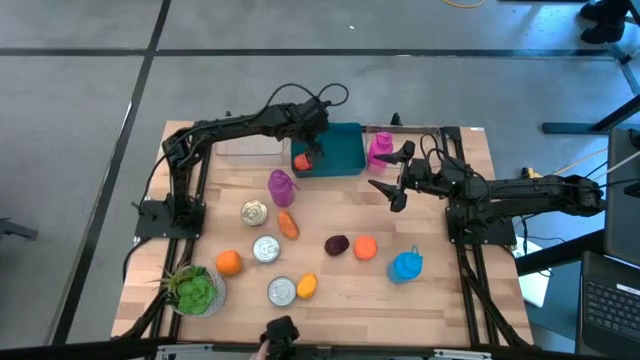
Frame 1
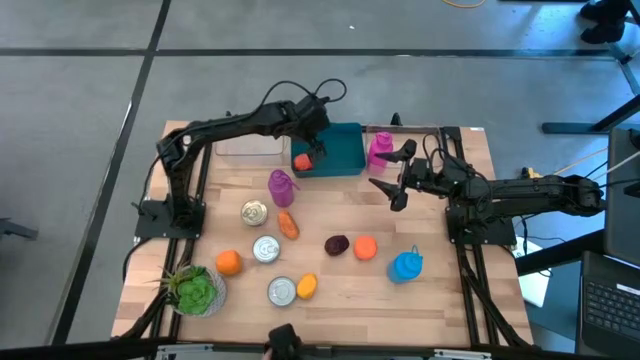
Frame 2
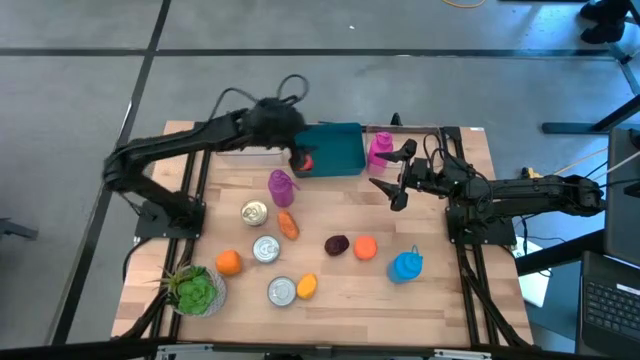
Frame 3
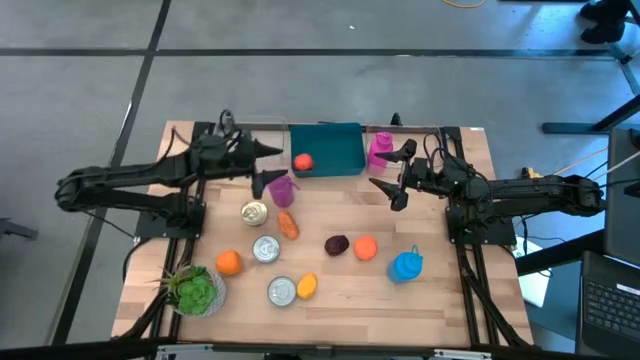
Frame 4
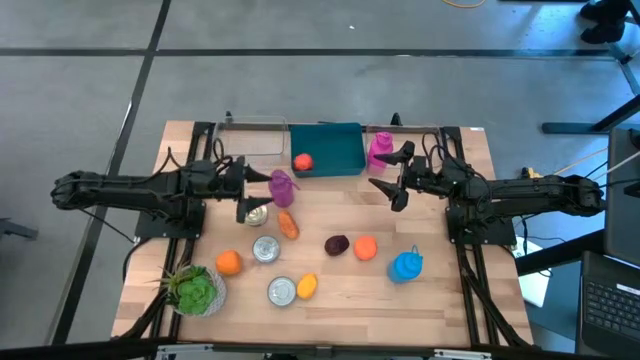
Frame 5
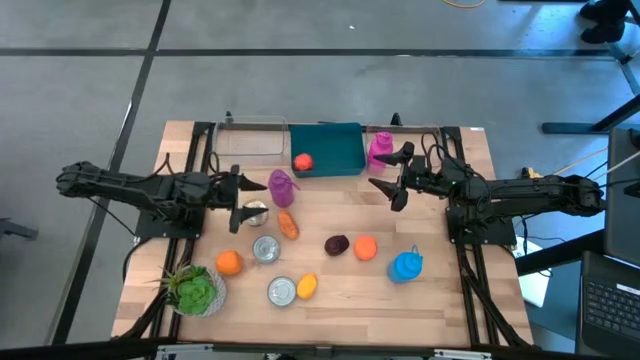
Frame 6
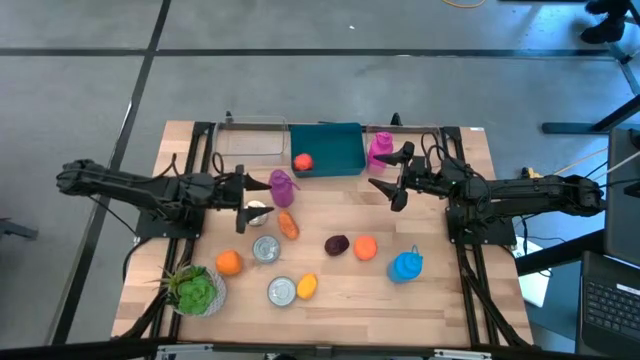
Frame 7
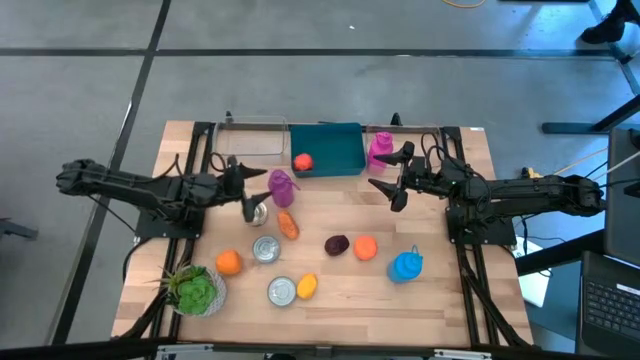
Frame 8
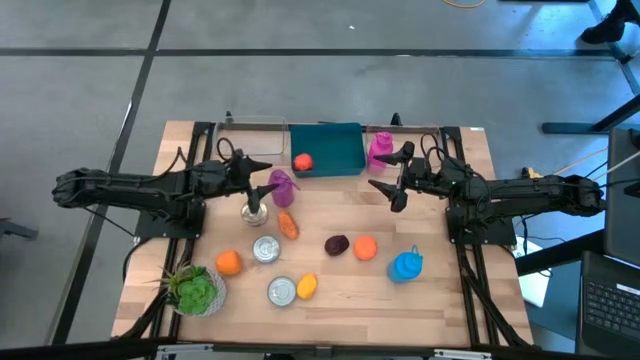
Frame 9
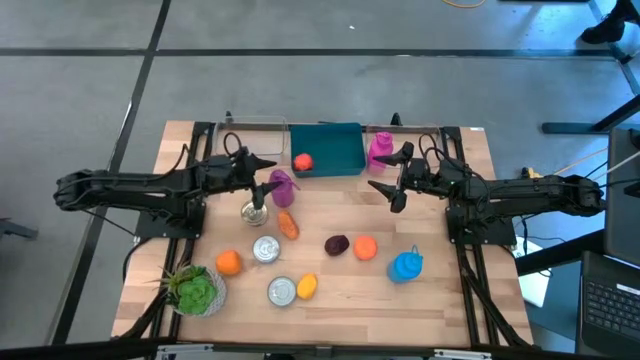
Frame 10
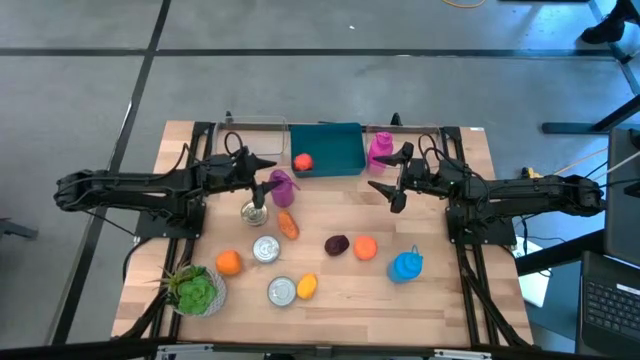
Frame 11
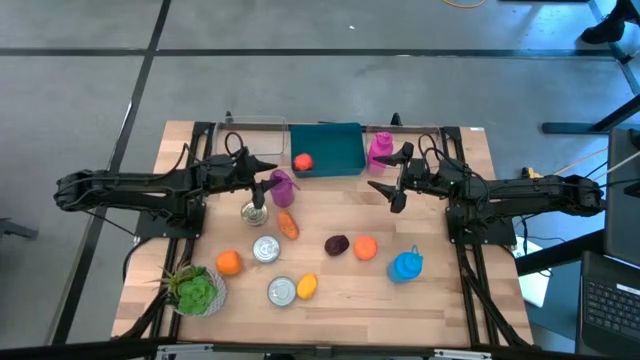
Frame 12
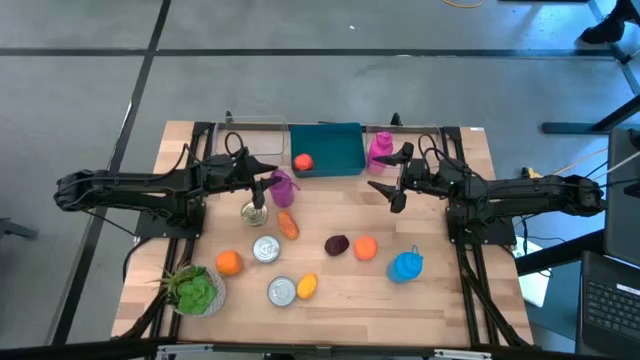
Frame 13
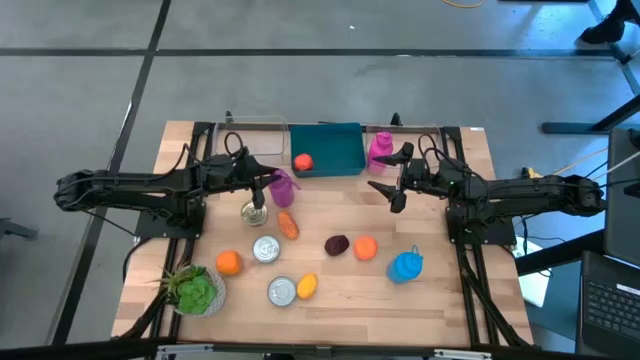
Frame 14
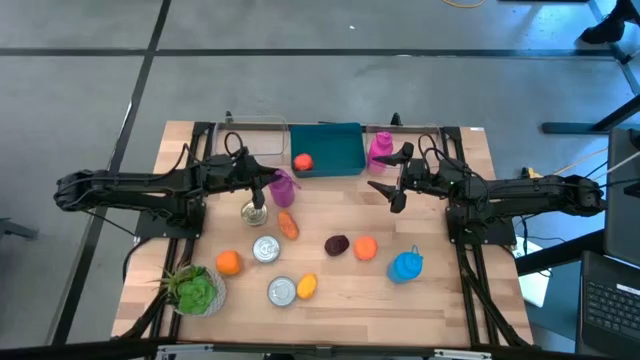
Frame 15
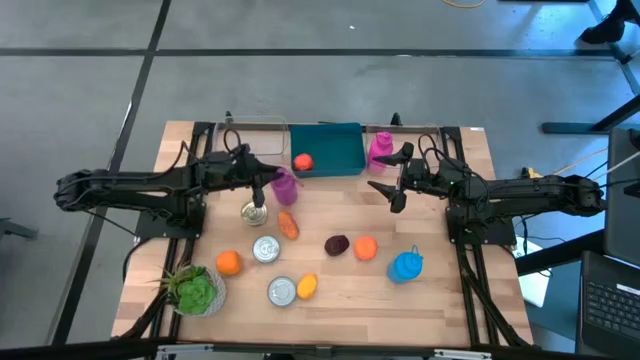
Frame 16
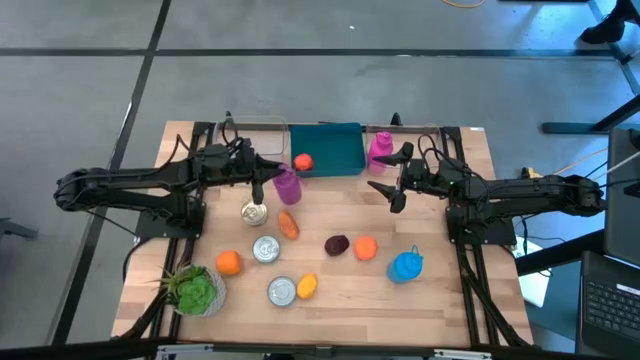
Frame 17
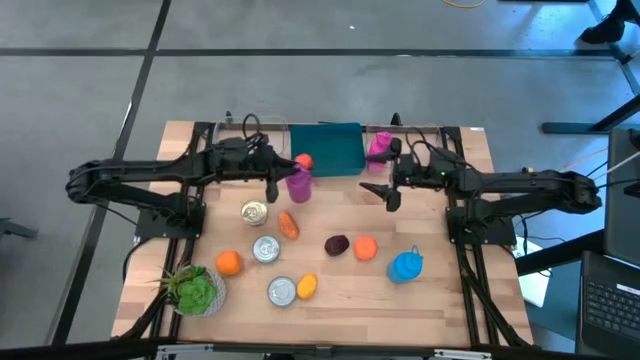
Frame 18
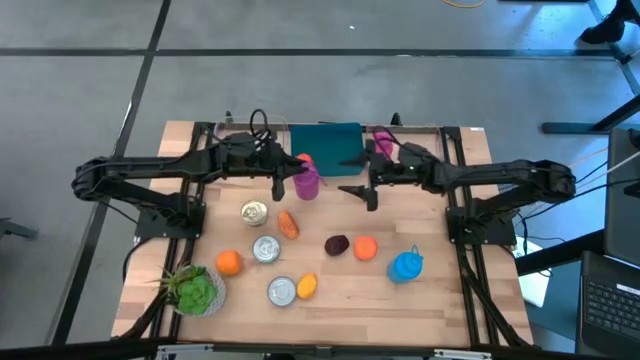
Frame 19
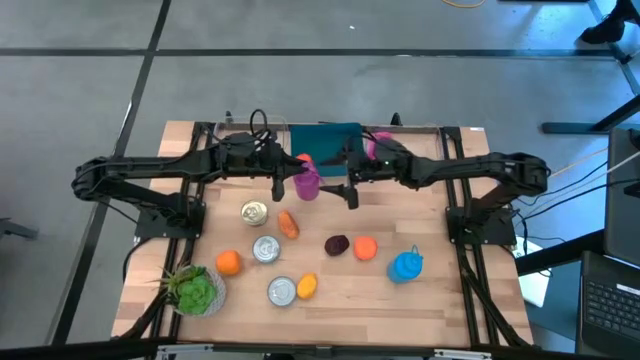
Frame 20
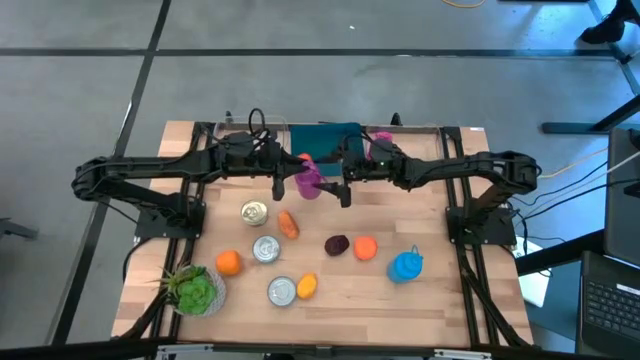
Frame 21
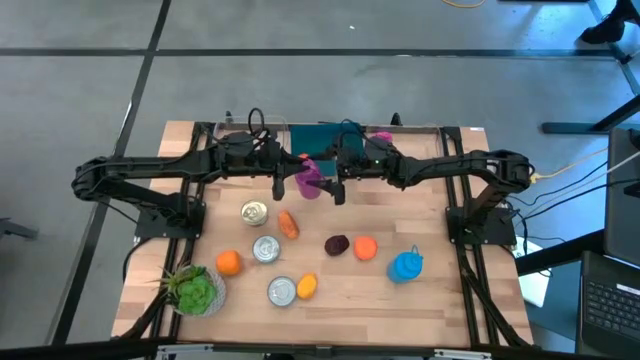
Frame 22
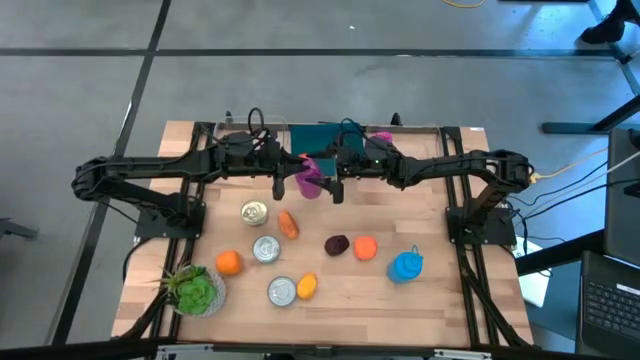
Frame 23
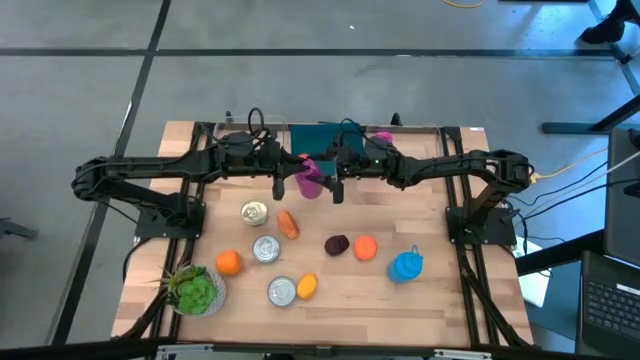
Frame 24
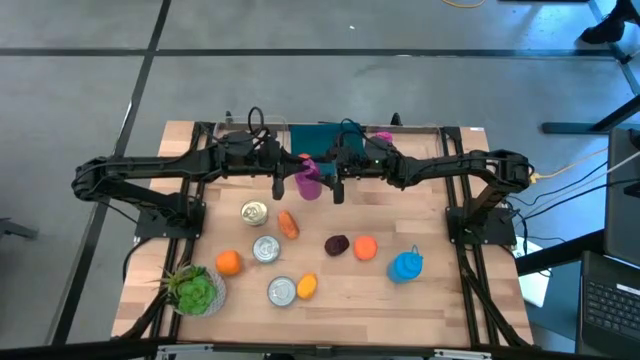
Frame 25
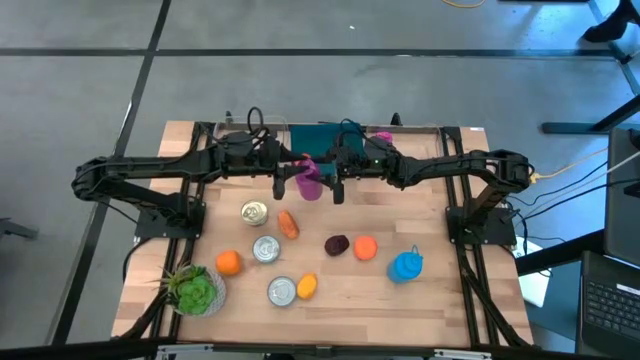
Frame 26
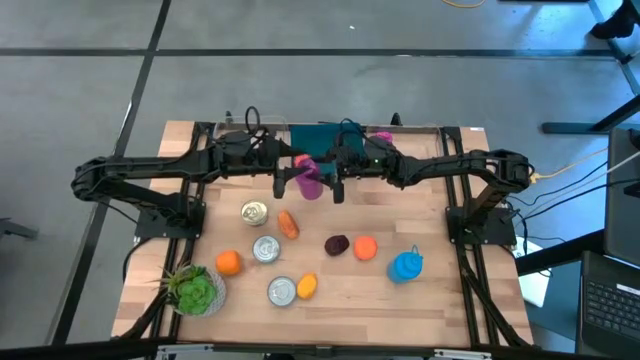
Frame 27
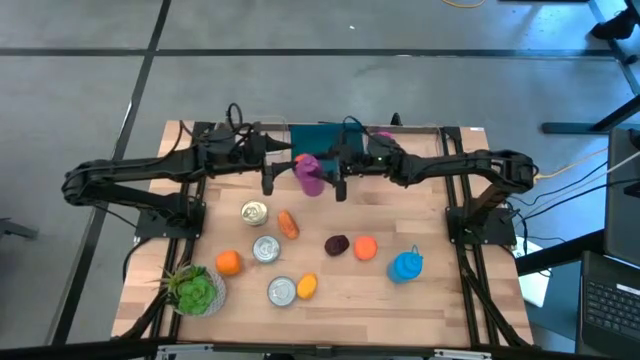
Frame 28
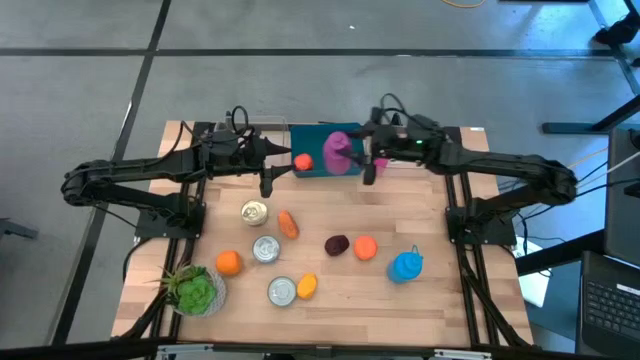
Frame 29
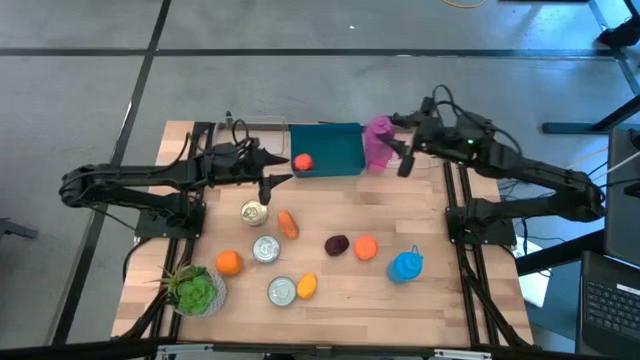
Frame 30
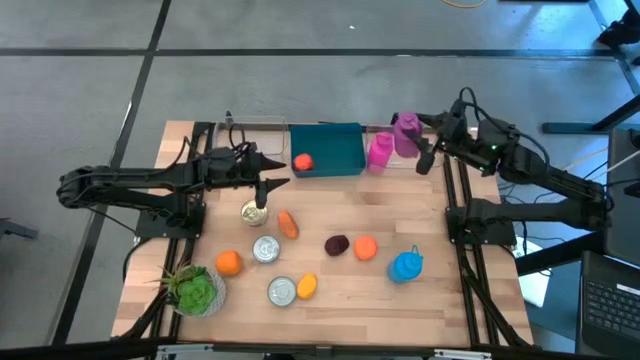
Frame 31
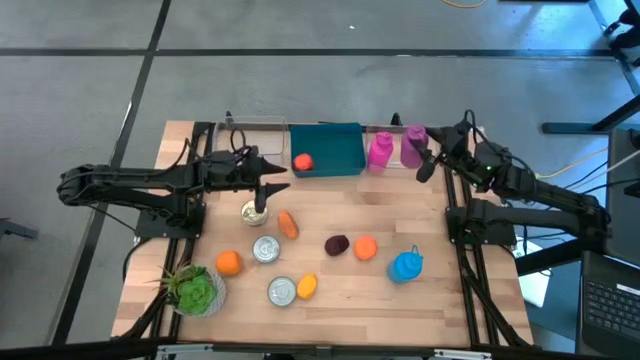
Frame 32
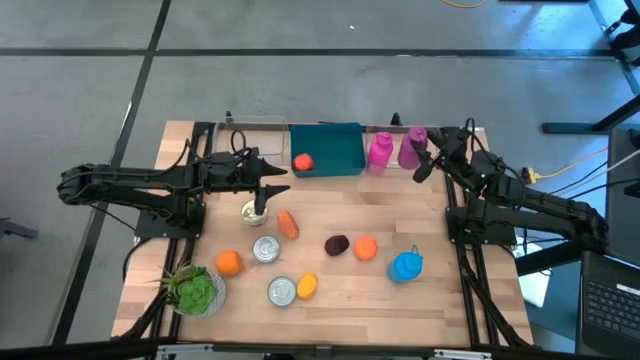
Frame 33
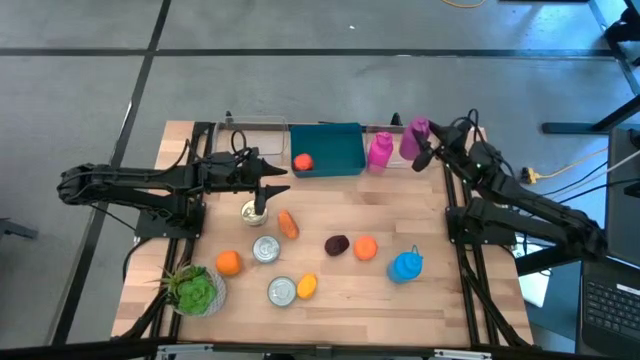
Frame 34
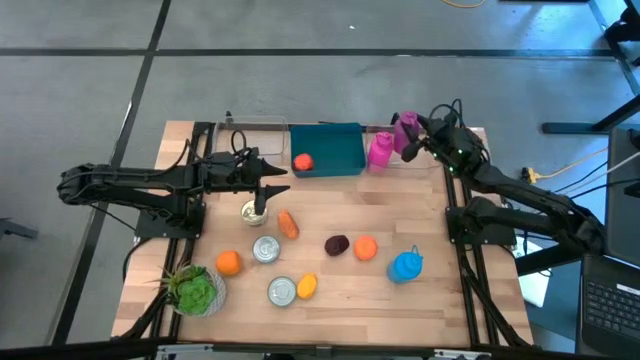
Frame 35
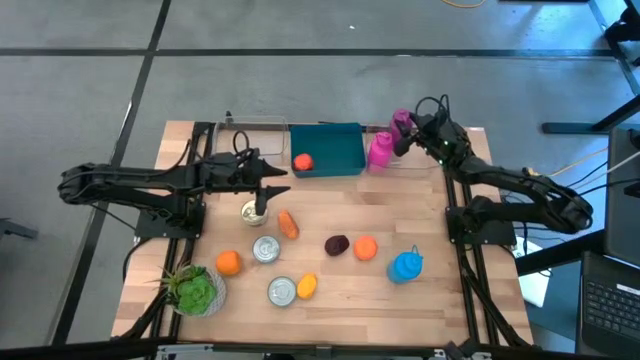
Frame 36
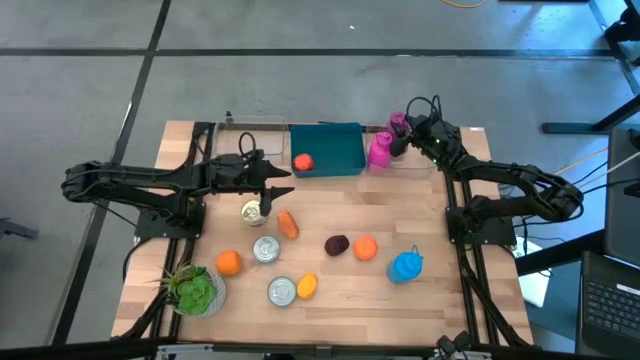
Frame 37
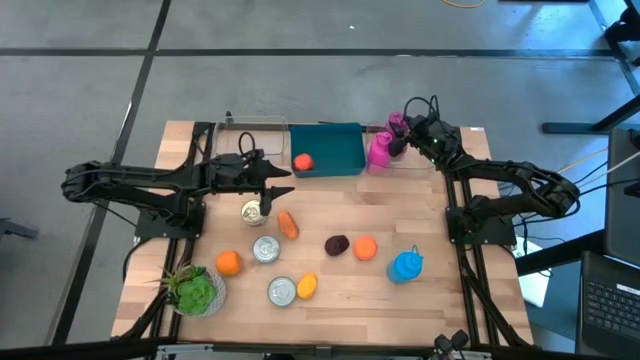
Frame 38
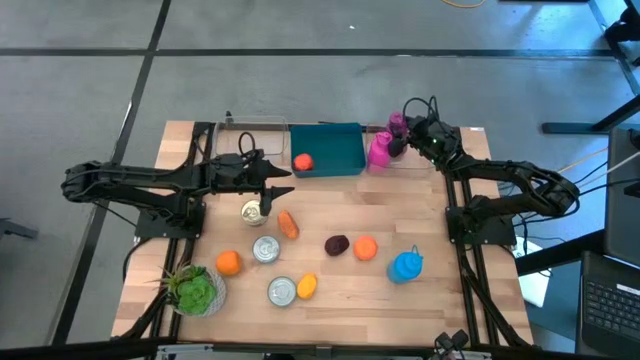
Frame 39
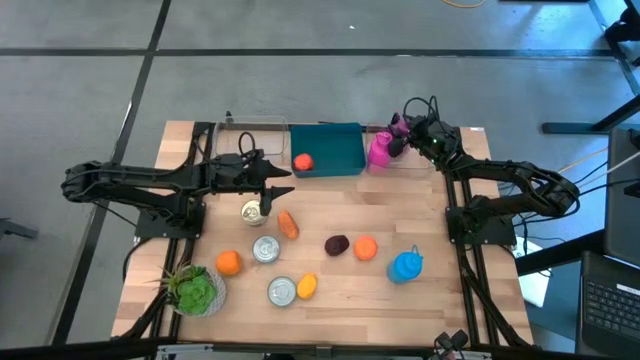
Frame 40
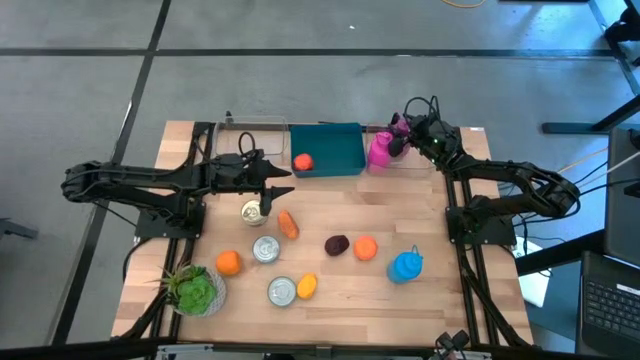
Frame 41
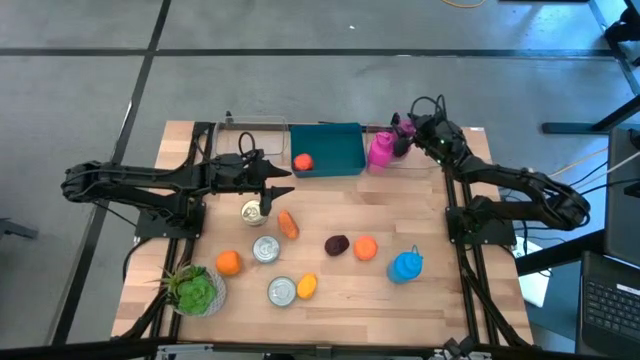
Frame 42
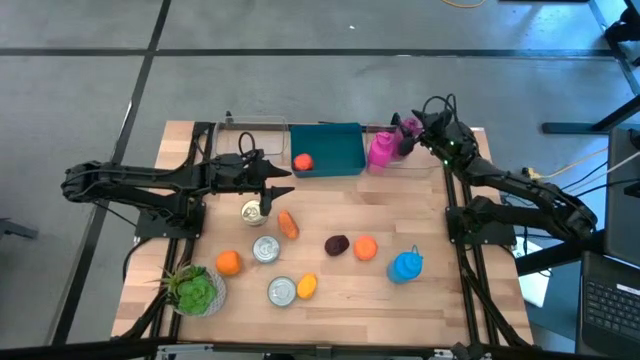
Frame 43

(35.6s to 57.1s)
Task: Pick & Place Food Item
Put the violet water bottle into the right transparent bin
